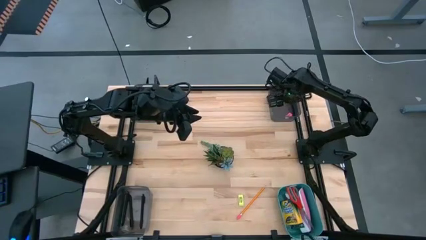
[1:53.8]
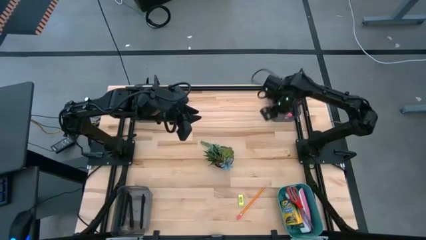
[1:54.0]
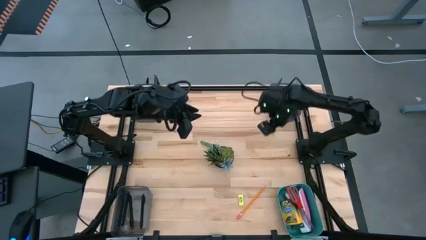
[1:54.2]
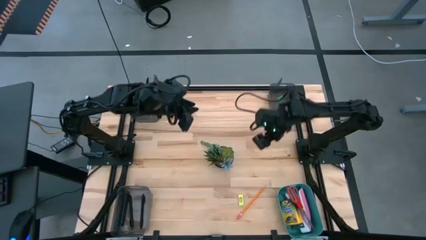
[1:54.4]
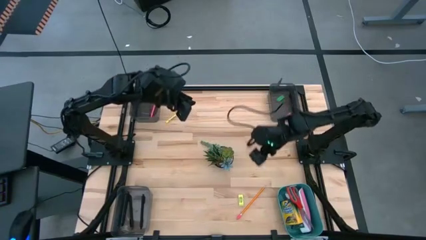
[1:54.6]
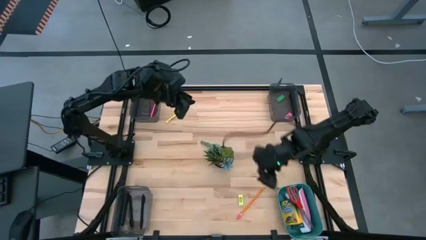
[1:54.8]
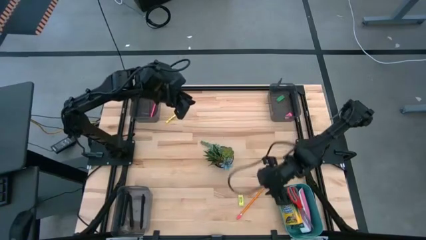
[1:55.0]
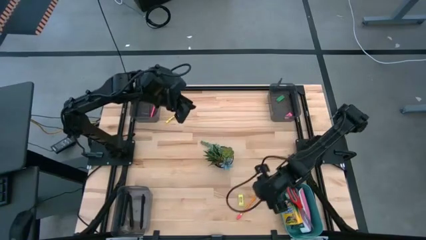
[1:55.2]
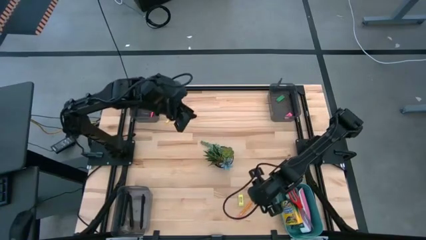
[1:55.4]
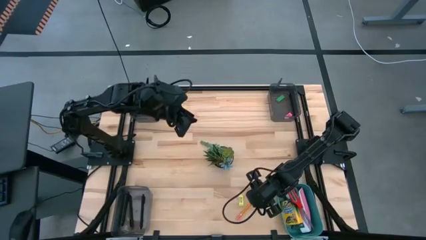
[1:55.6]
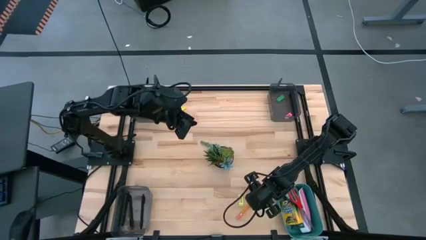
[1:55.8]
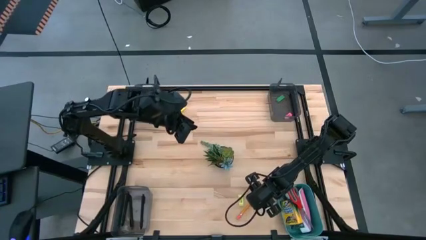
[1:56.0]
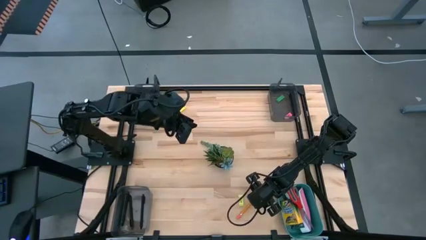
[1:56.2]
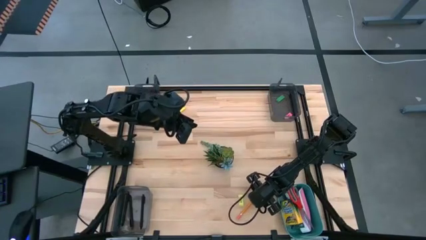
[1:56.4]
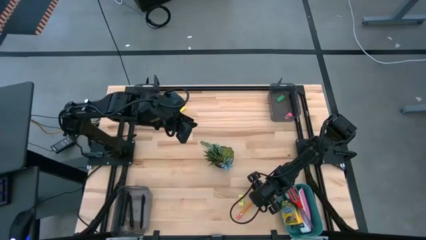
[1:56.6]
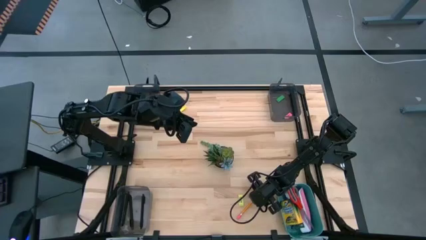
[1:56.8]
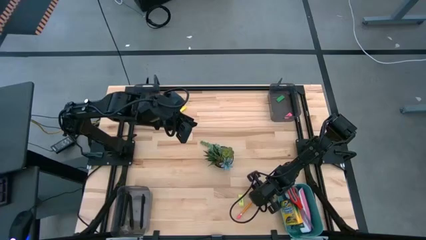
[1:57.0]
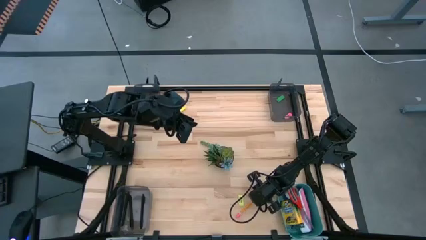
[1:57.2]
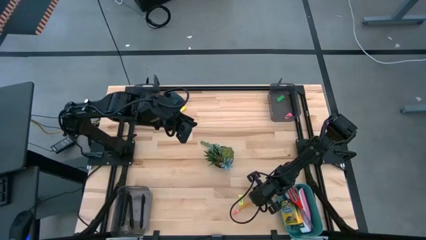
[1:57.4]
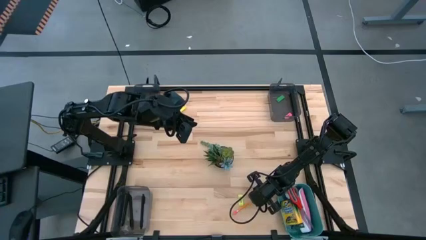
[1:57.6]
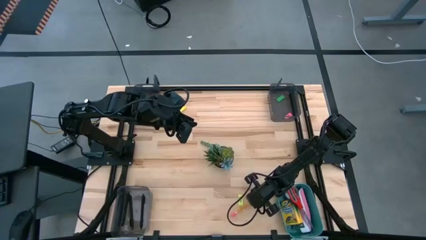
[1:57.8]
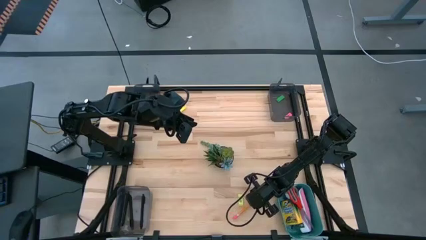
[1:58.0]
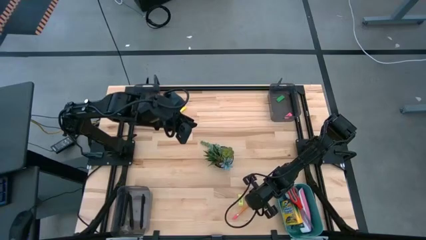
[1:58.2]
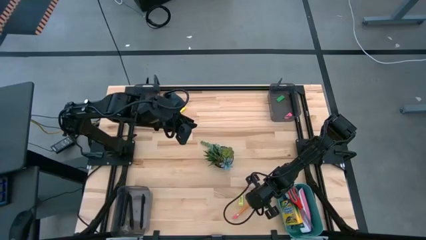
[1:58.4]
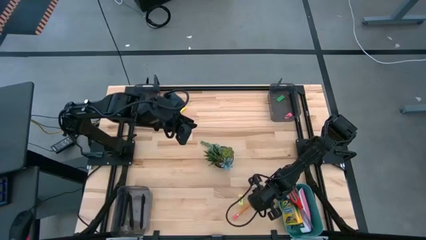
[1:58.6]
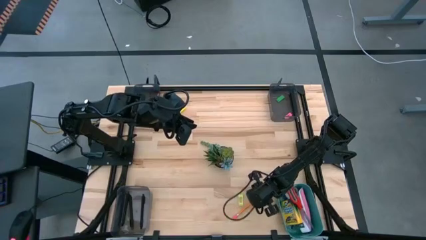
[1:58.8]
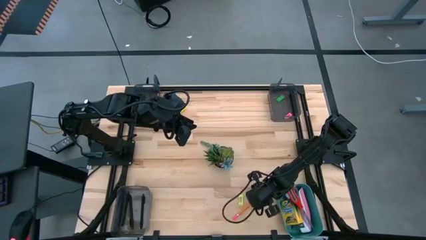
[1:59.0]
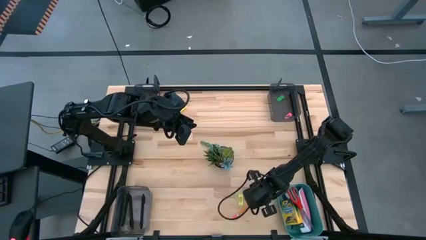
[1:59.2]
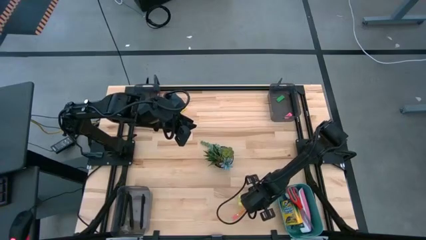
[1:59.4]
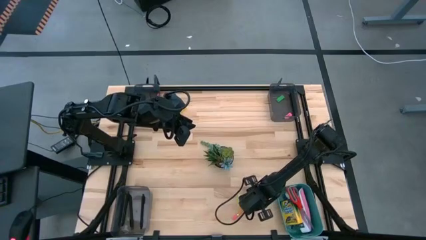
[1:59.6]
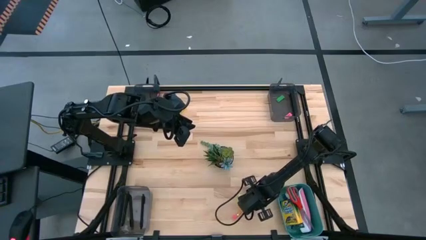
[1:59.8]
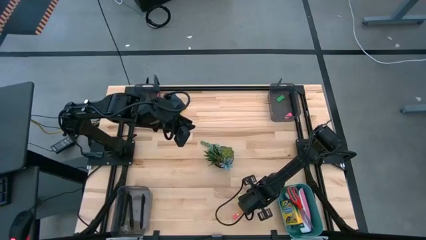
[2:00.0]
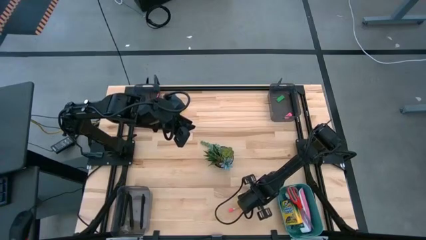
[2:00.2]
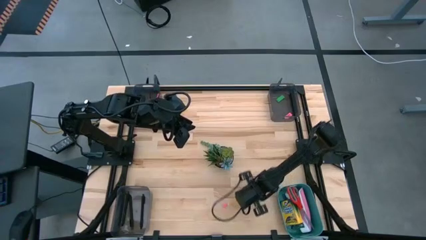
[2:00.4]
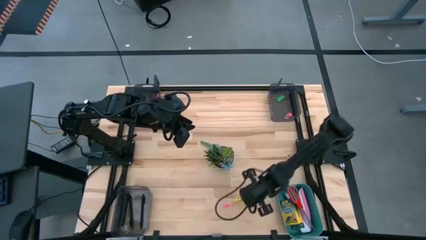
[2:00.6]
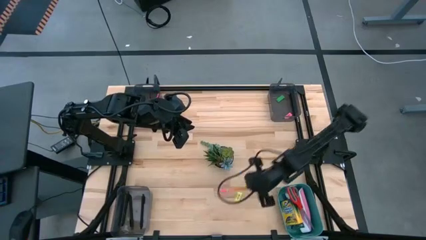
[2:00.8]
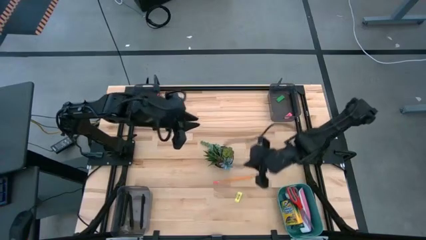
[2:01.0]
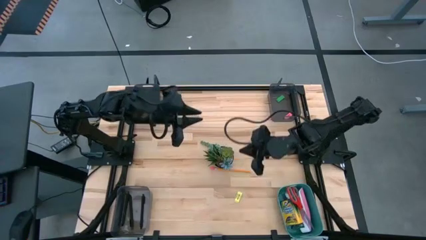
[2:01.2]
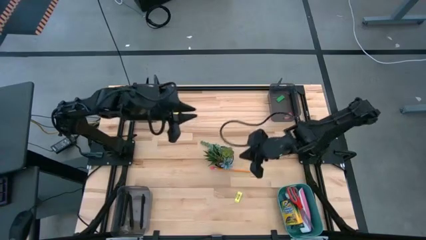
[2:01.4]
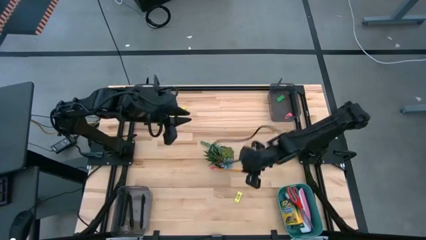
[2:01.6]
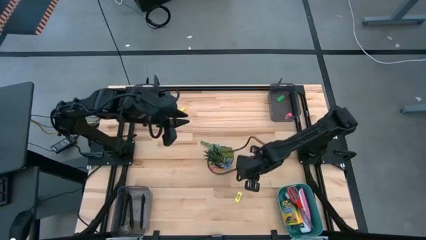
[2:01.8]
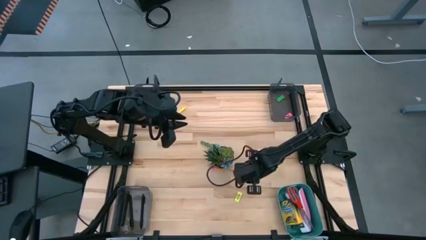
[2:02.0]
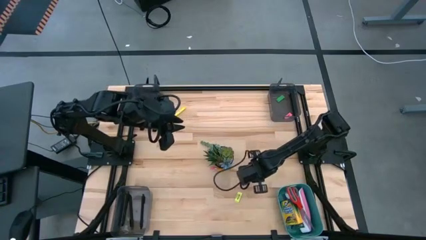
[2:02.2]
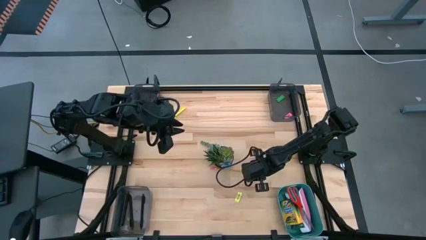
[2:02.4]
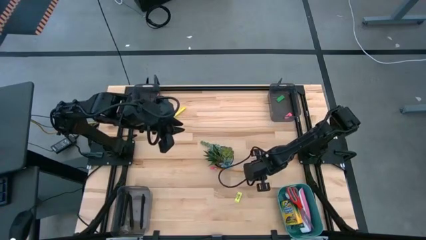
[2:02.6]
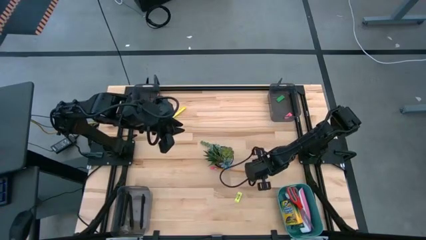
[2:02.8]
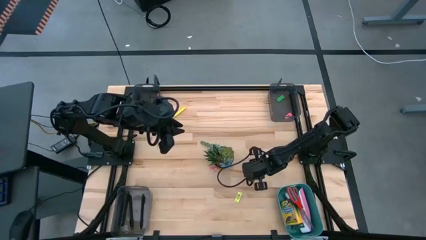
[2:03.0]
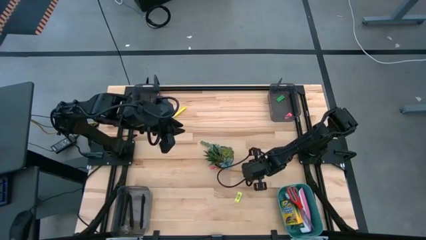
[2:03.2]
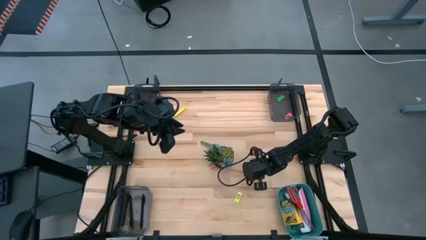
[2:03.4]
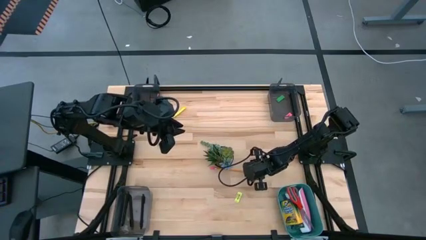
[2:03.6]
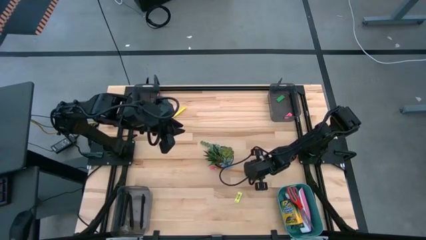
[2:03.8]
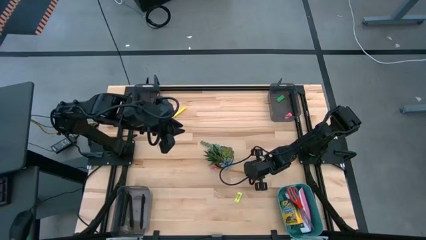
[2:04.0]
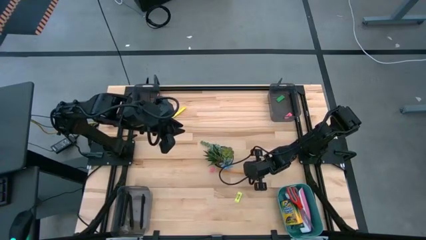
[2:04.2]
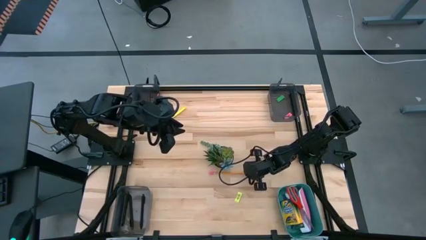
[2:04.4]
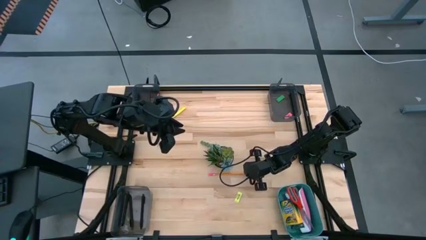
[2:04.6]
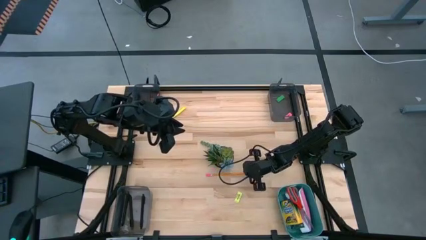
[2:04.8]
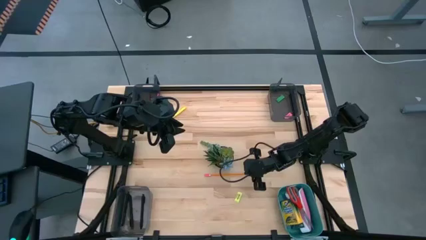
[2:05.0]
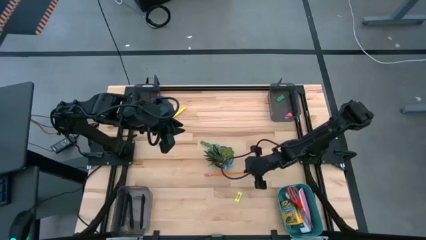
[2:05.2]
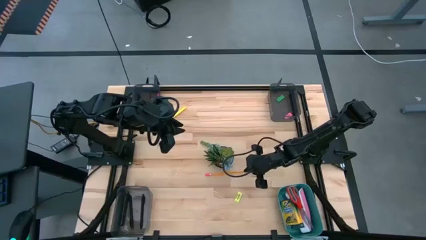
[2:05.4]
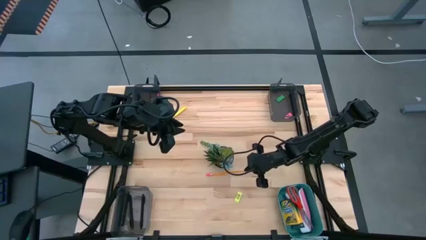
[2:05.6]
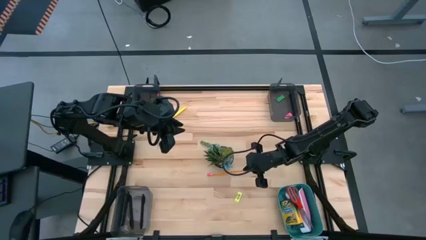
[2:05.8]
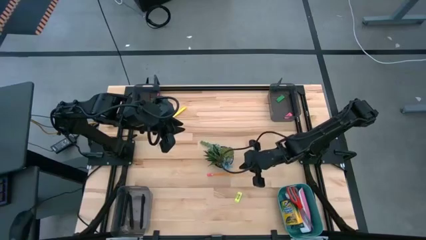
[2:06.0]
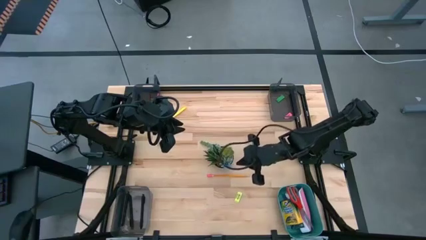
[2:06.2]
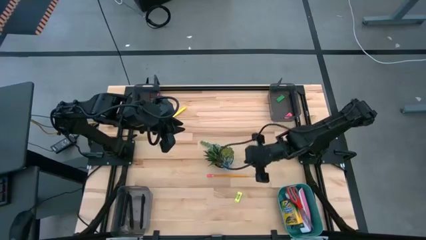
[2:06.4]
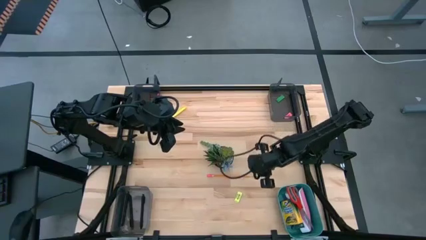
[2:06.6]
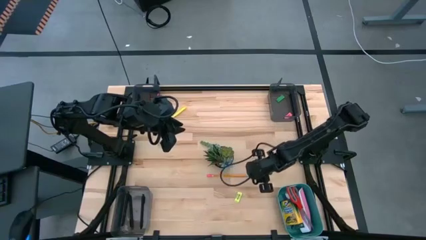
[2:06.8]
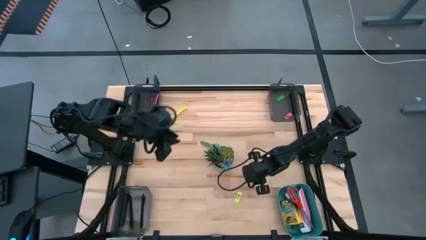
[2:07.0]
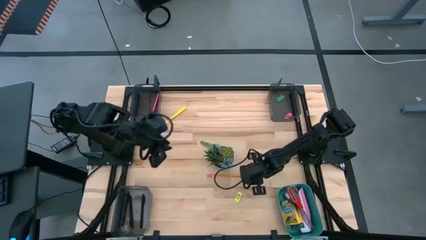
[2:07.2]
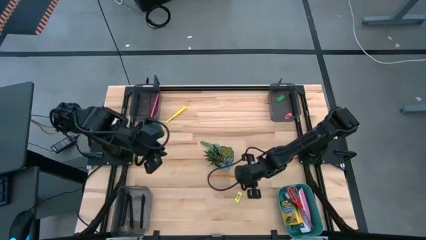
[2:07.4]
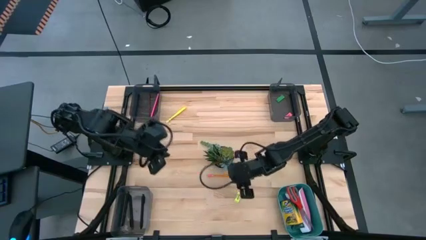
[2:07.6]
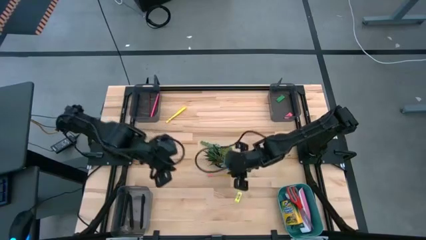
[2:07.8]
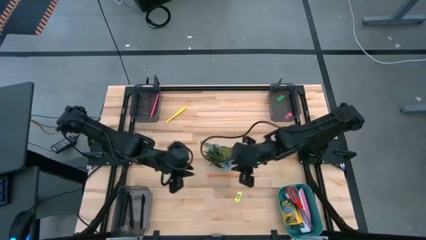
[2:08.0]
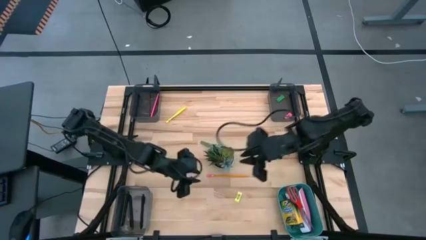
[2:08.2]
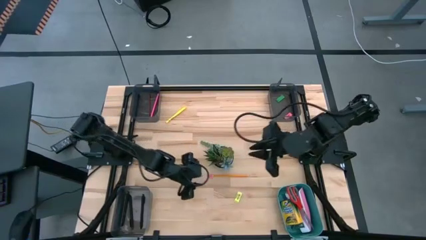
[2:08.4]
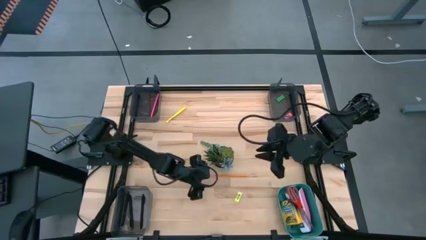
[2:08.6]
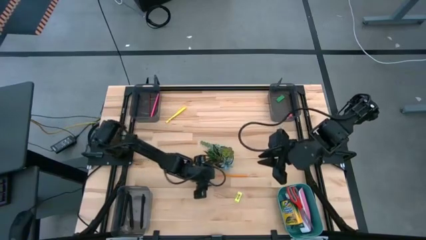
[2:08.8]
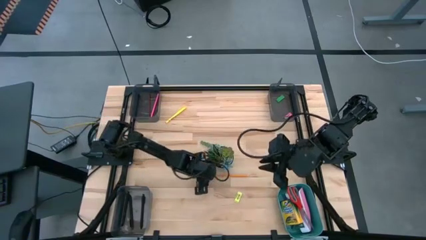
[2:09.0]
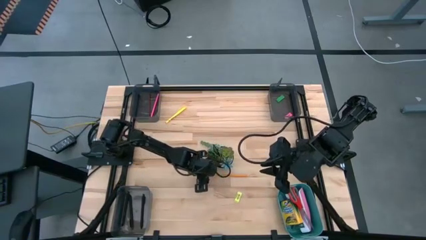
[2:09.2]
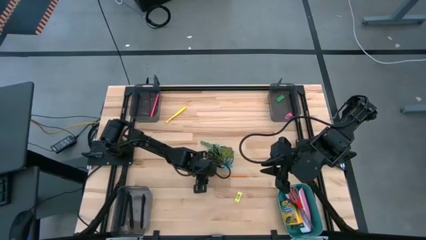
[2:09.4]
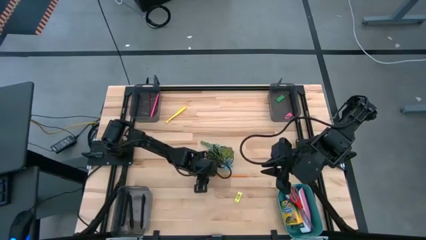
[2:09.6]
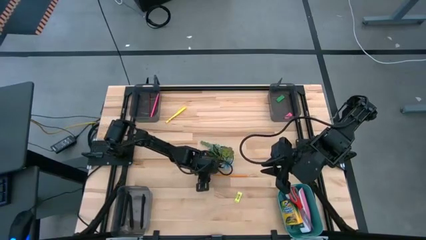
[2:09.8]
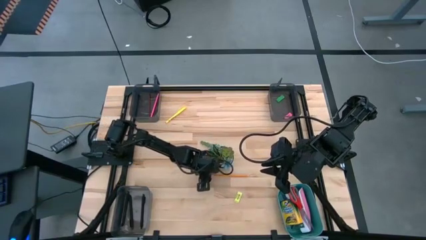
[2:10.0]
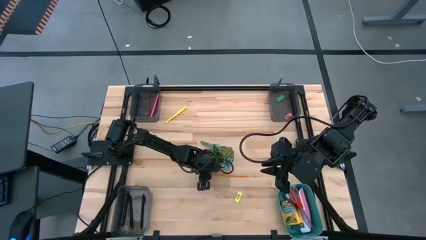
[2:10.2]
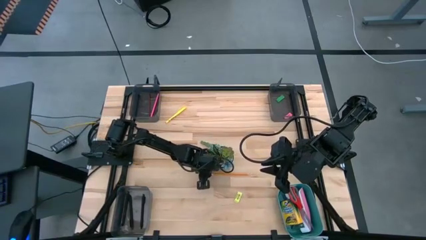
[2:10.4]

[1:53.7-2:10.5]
Task: Sort crayons/erasers/pens/pencils in bins
Put the orange pencil into the top left black bin
